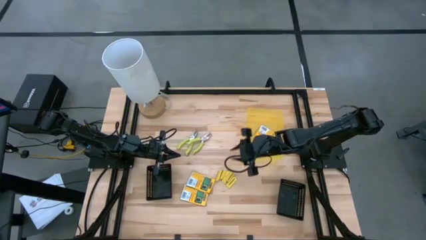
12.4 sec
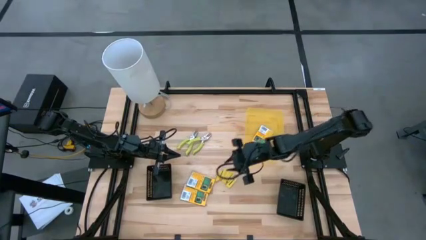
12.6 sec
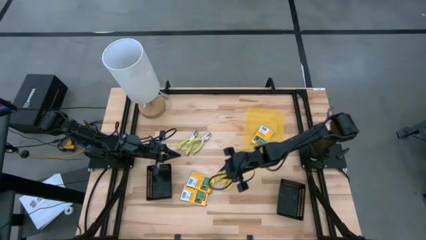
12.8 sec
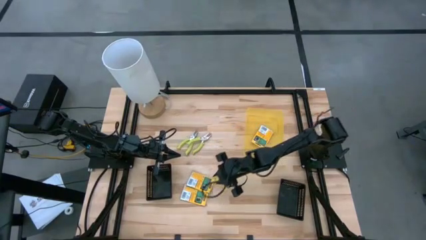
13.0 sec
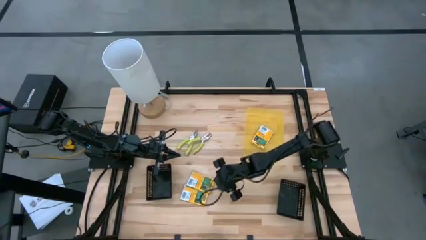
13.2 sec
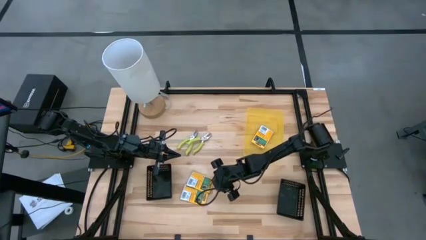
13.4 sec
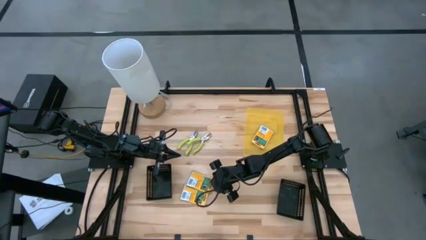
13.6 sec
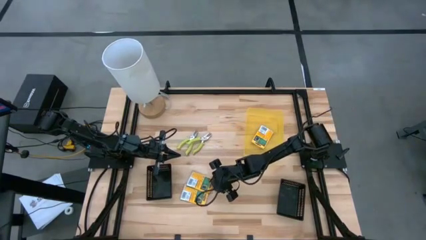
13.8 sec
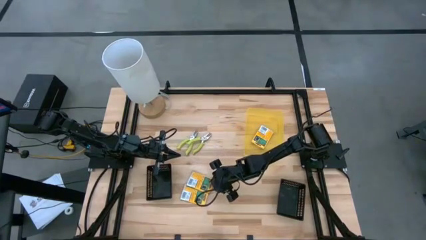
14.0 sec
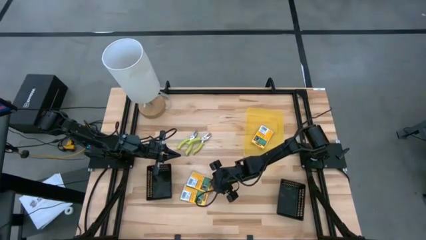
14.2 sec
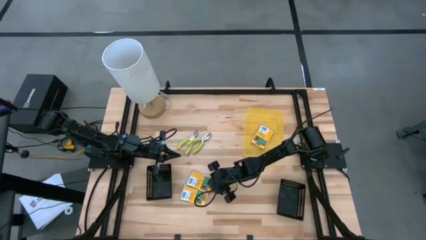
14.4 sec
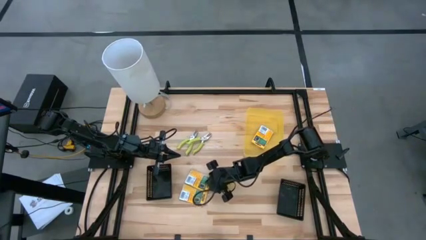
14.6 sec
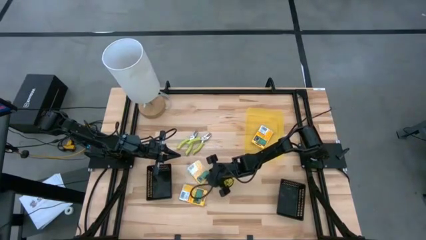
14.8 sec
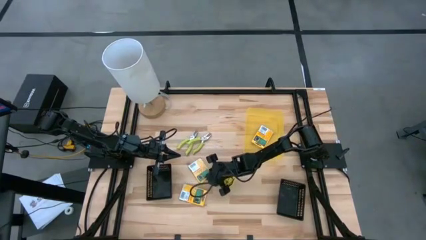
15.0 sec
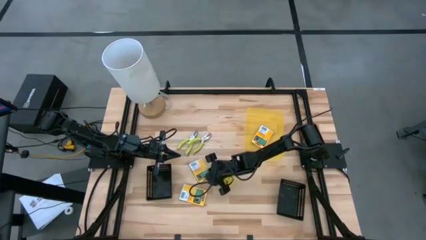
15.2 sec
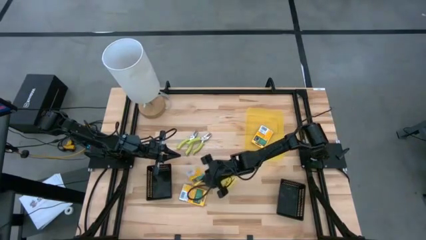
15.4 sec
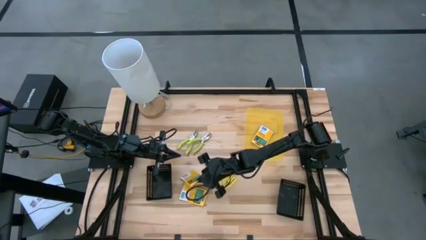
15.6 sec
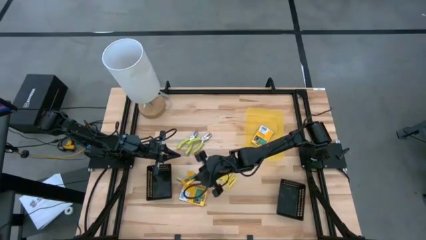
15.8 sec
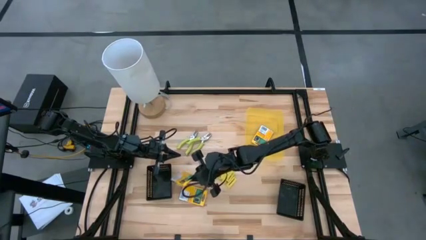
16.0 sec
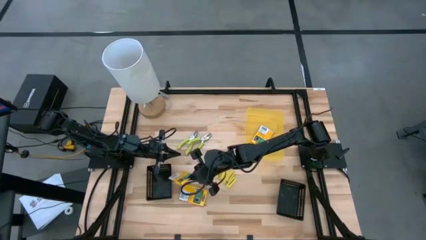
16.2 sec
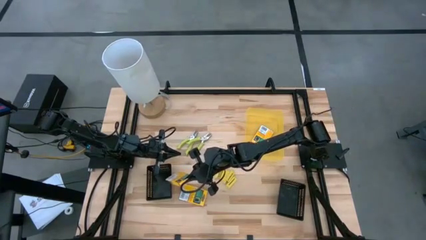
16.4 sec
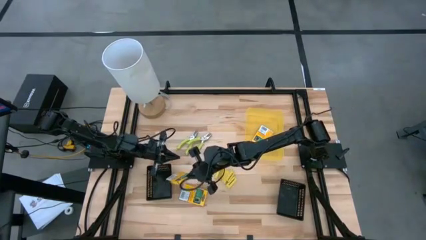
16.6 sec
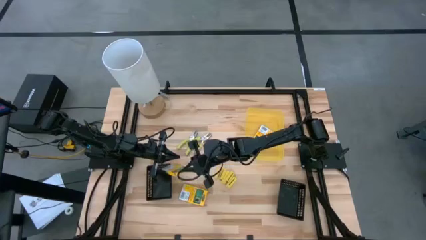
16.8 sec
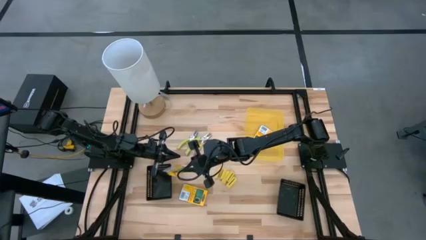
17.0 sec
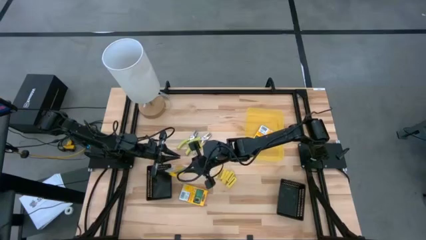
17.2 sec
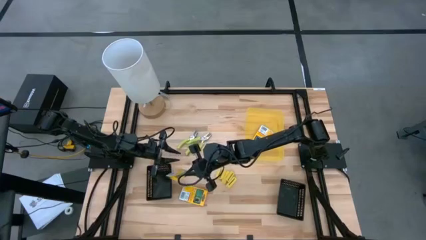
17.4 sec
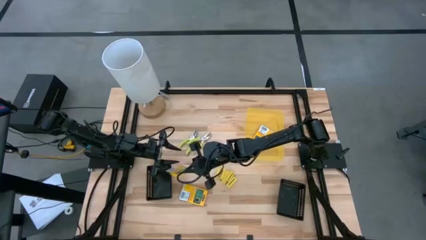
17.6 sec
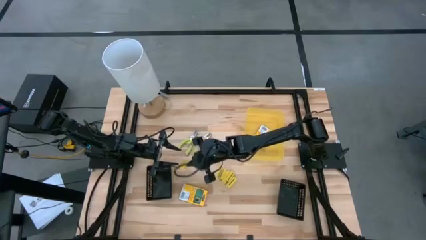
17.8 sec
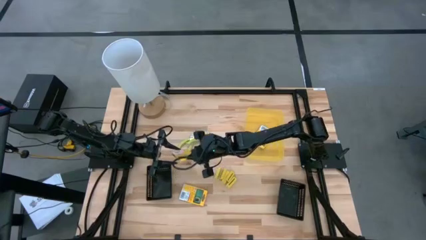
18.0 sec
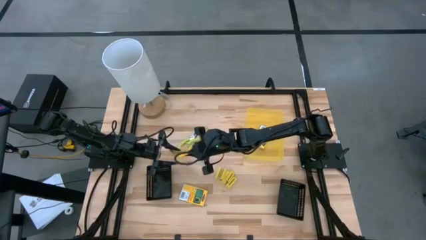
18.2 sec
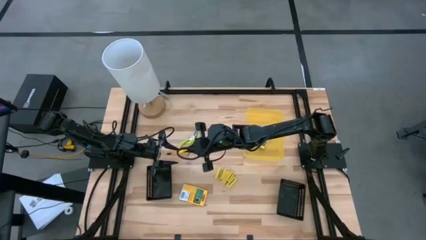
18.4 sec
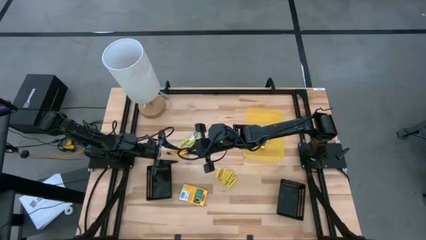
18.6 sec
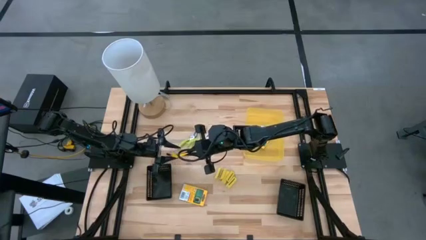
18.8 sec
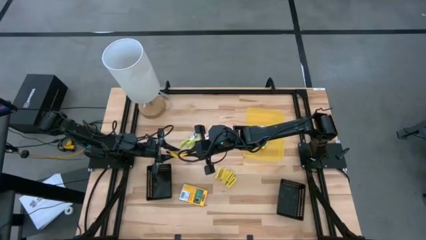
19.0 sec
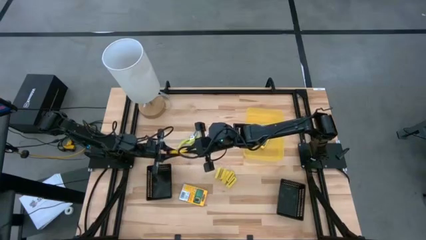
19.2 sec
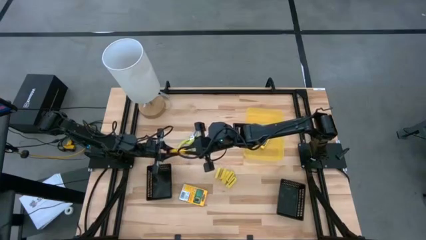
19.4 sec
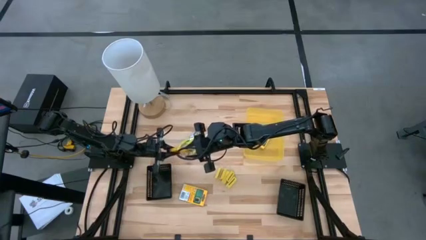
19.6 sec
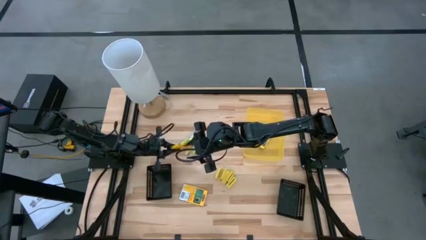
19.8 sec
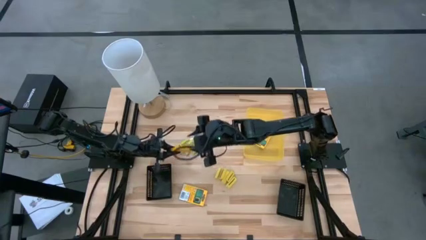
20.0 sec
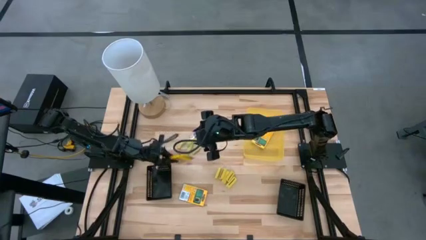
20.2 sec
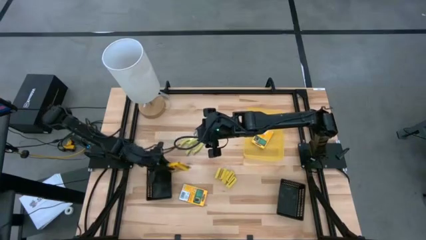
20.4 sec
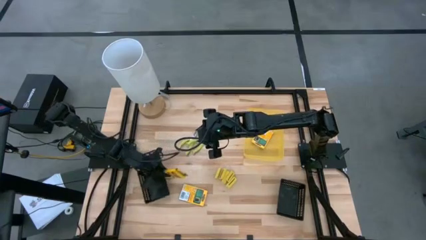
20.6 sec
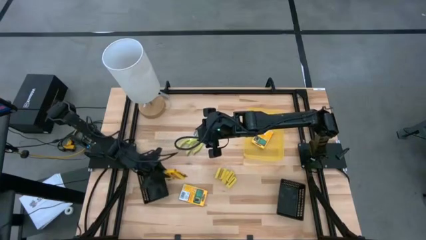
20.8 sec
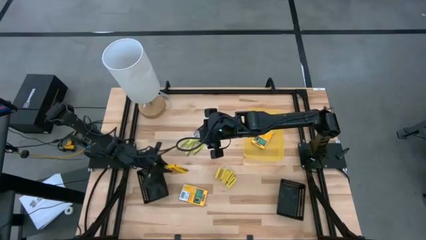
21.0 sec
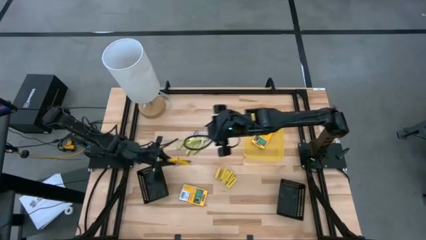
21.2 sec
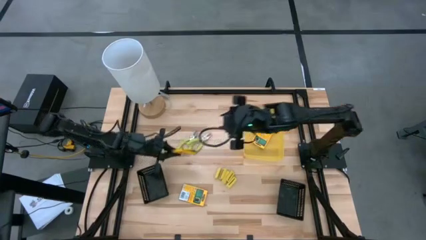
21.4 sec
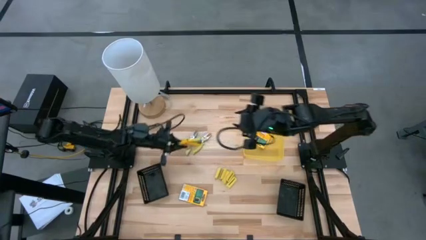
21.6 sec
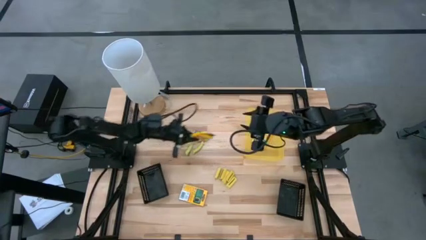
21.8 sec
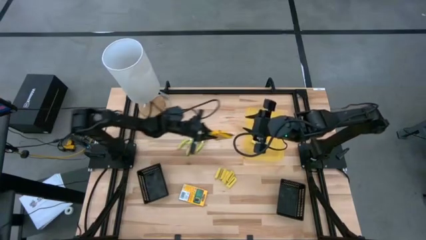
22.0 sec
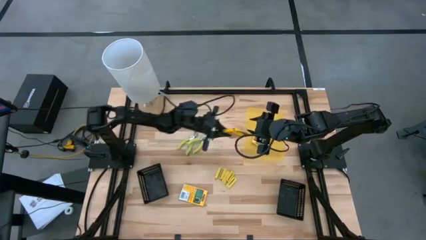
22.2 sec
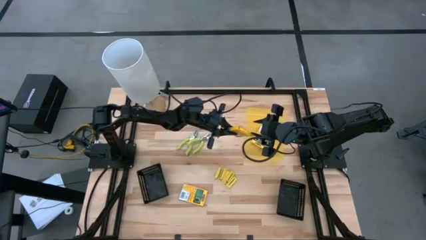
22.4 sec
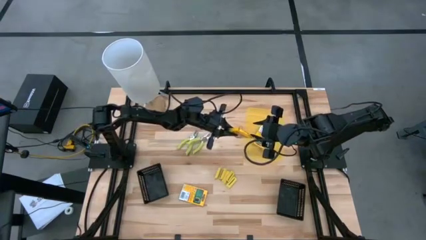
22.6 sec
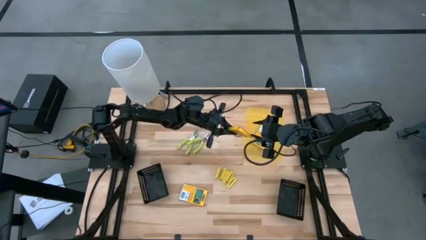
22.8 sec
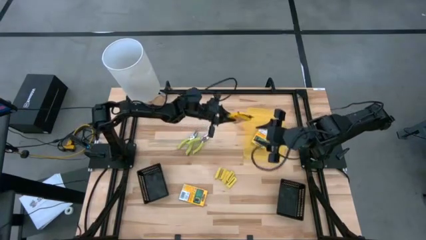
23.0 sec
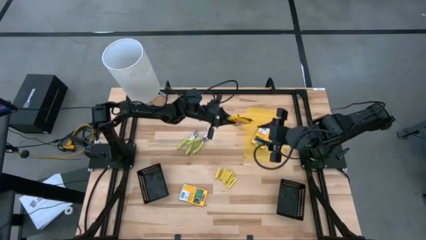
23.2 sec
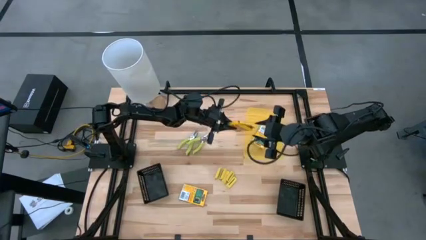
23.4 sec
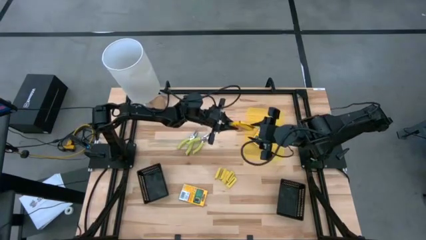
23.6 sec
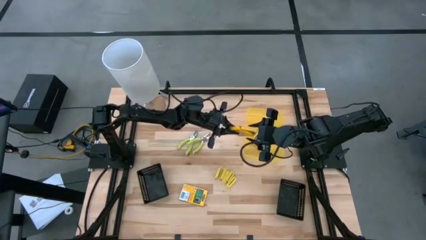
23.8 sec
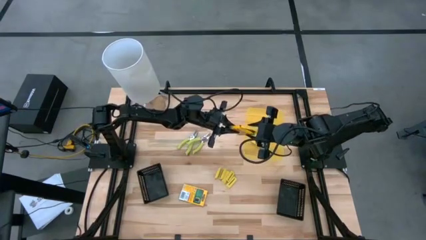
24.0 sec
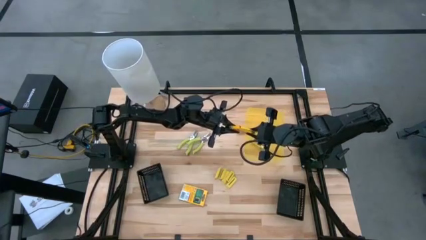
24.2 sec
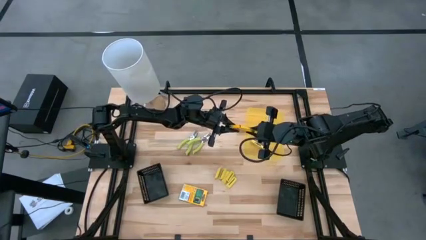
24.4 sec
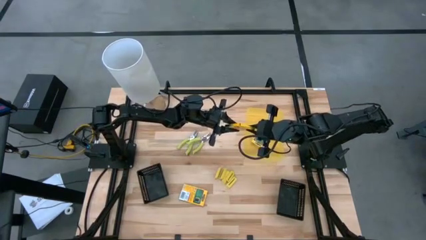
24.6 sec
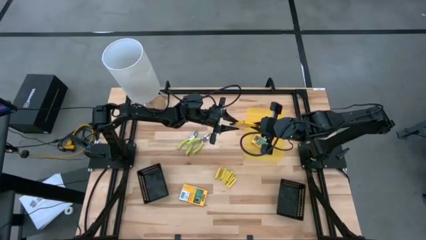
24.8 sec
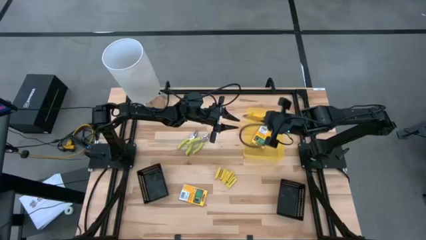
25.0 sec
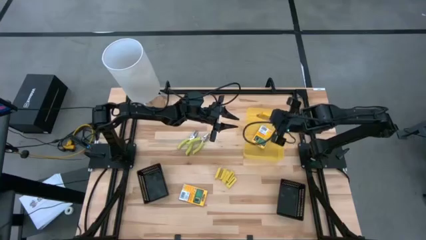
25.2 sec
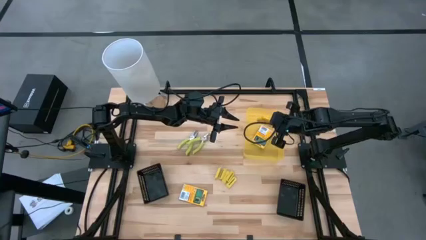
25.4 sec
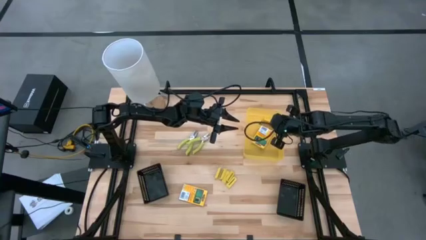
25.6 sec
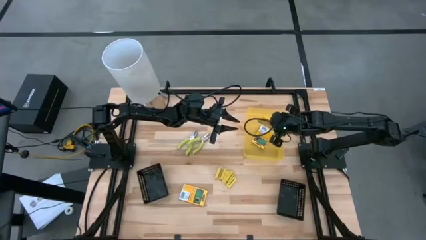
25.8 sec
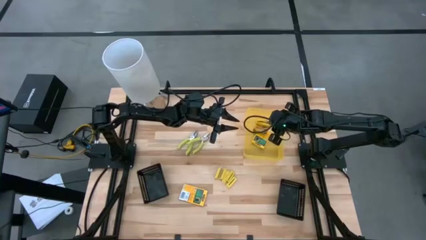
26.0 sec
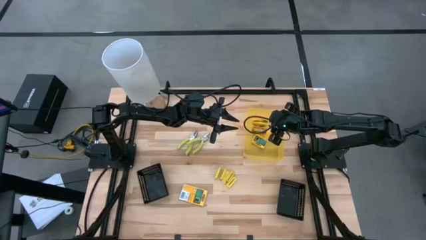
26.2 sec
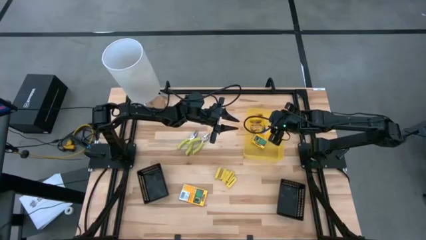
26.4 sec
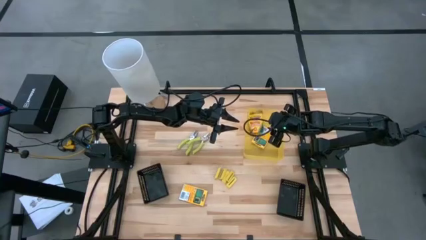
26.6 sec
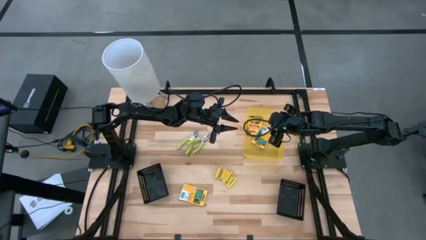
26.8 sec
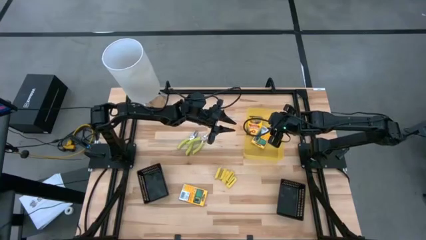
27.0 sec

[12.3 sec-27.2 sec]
Task: Pick & Place School Supplies
Put the top crayon box into the yellow bin
